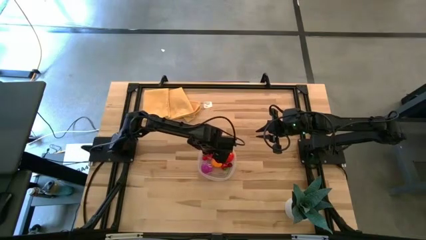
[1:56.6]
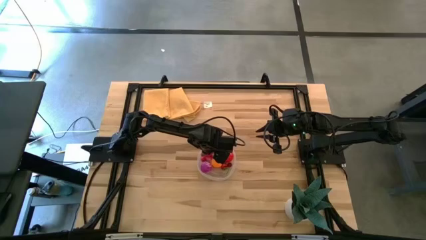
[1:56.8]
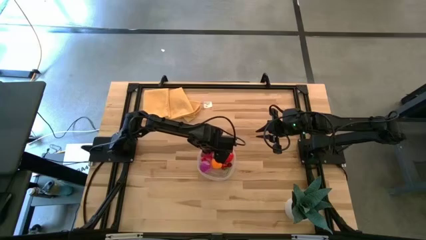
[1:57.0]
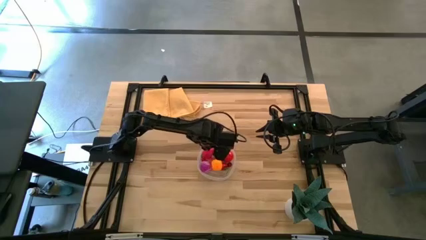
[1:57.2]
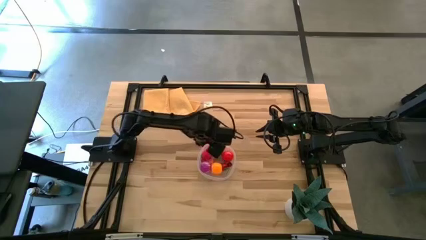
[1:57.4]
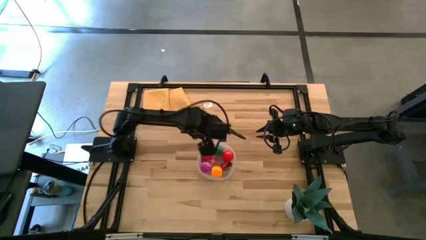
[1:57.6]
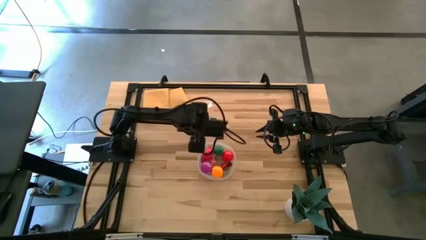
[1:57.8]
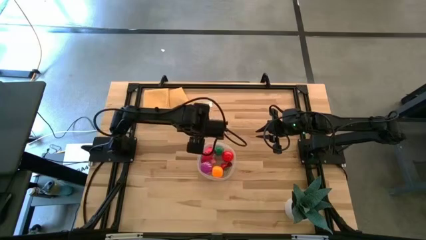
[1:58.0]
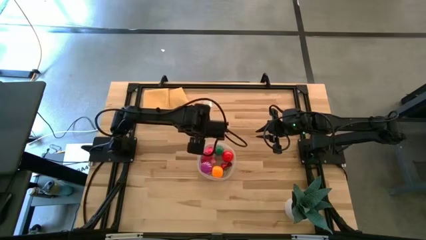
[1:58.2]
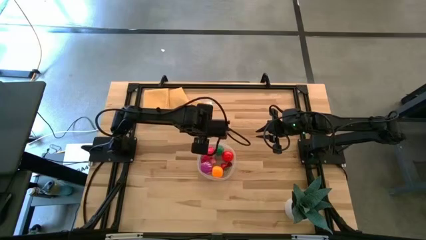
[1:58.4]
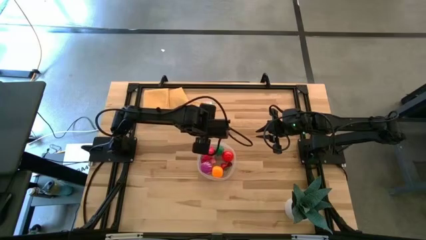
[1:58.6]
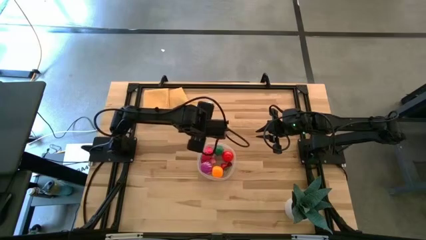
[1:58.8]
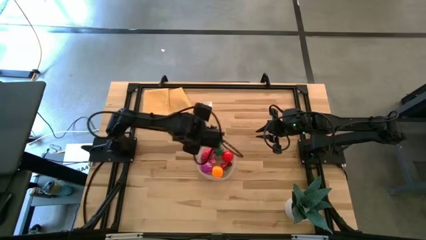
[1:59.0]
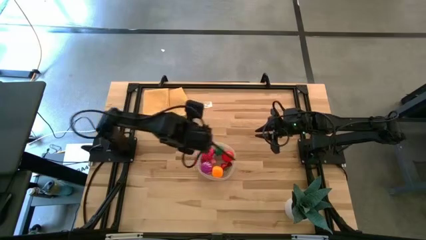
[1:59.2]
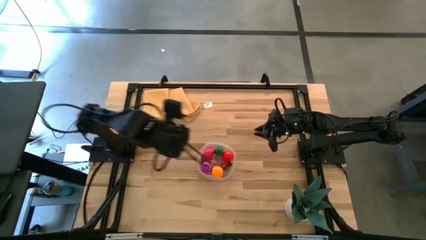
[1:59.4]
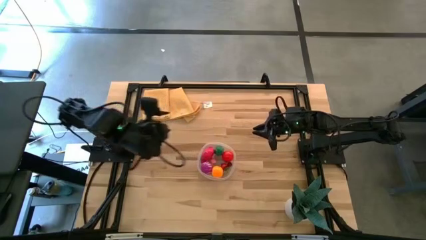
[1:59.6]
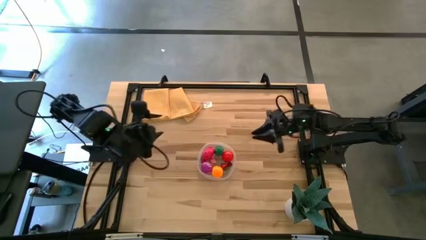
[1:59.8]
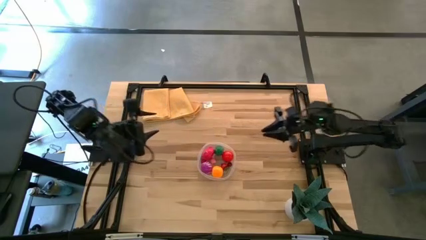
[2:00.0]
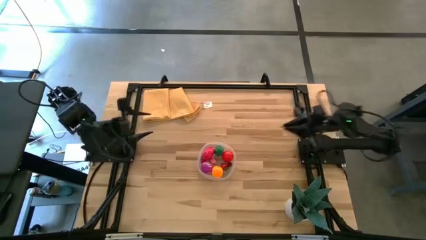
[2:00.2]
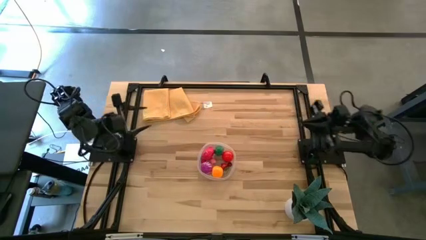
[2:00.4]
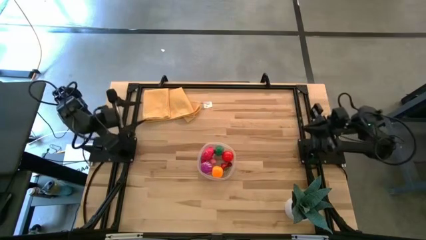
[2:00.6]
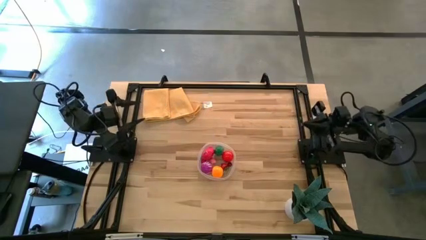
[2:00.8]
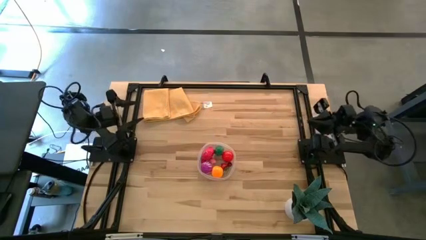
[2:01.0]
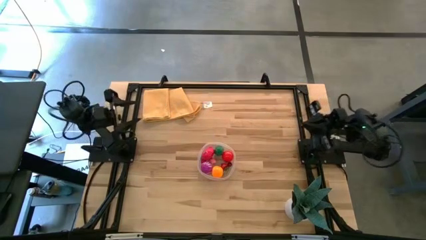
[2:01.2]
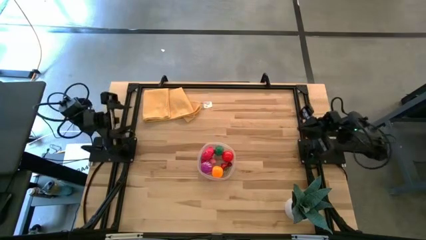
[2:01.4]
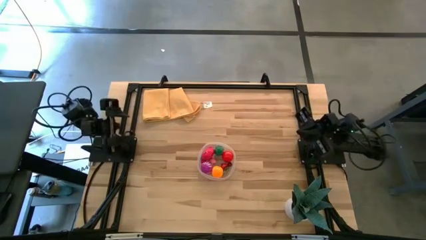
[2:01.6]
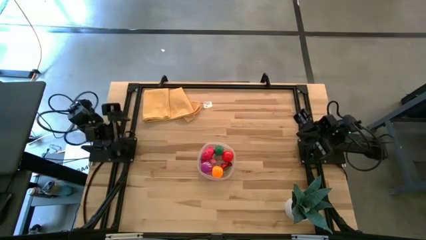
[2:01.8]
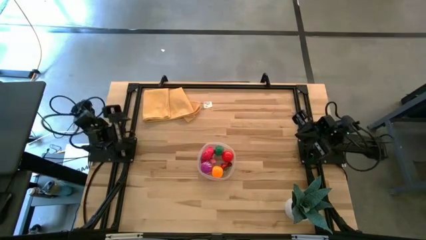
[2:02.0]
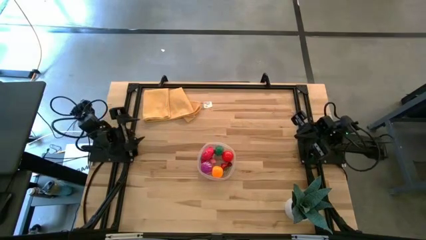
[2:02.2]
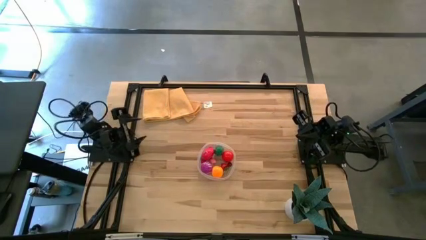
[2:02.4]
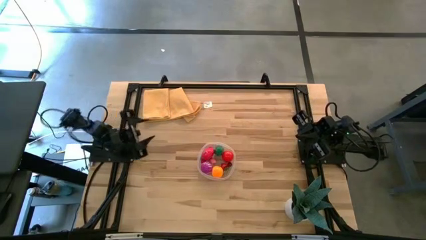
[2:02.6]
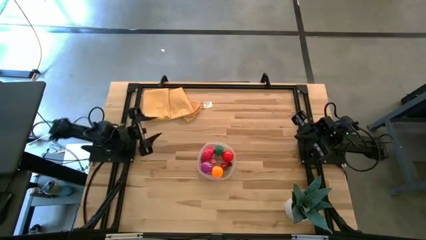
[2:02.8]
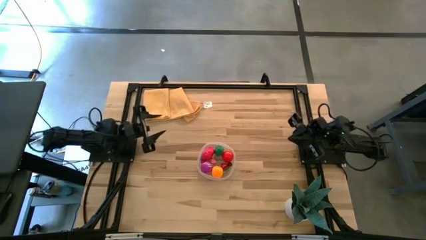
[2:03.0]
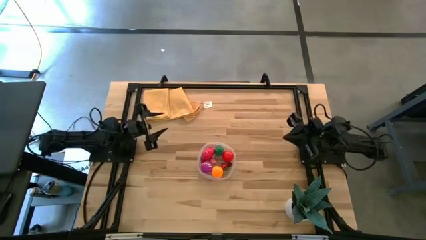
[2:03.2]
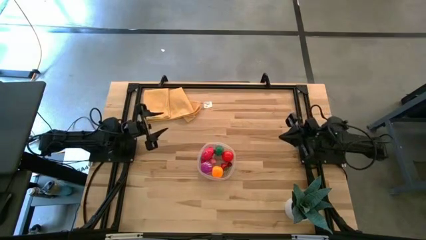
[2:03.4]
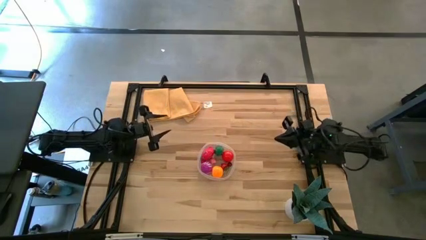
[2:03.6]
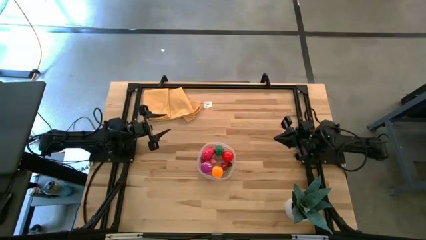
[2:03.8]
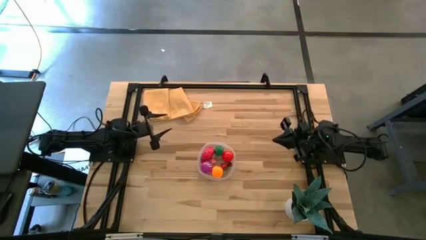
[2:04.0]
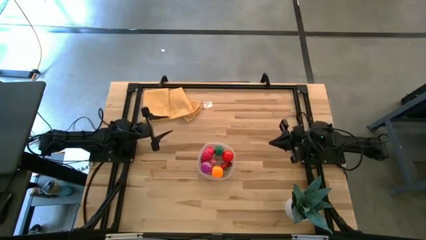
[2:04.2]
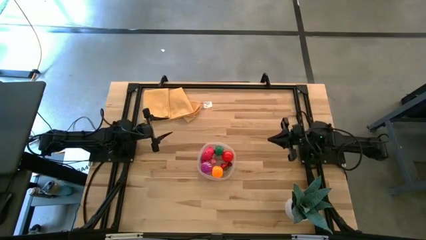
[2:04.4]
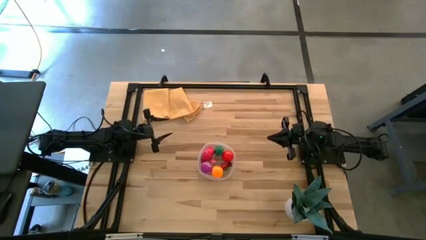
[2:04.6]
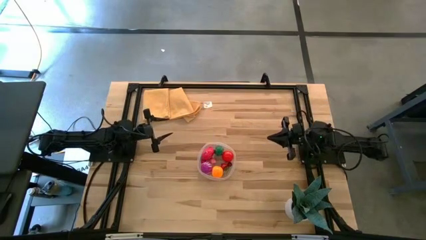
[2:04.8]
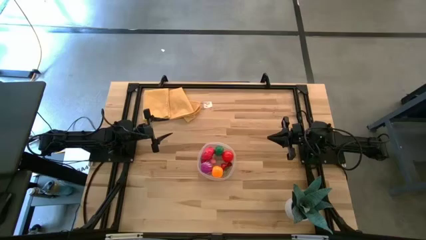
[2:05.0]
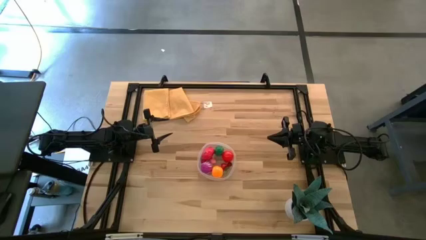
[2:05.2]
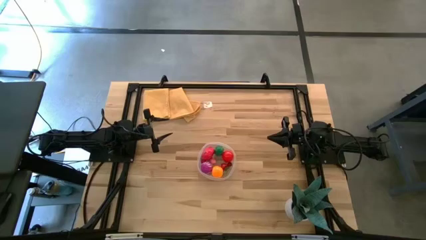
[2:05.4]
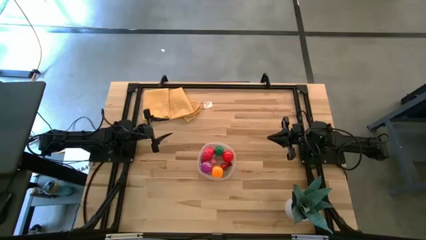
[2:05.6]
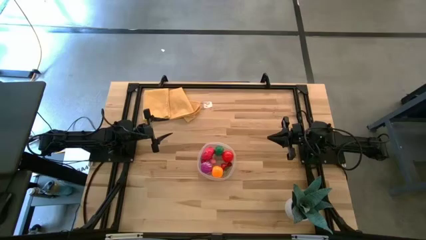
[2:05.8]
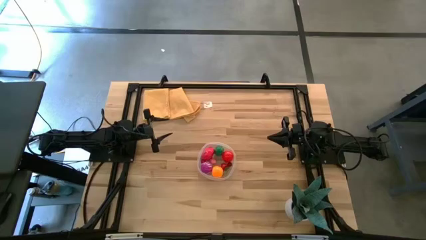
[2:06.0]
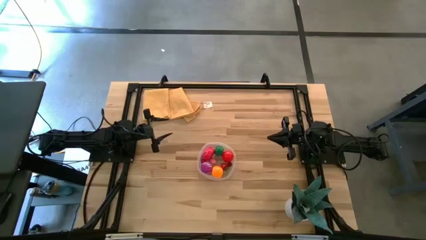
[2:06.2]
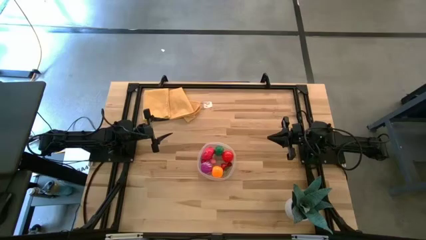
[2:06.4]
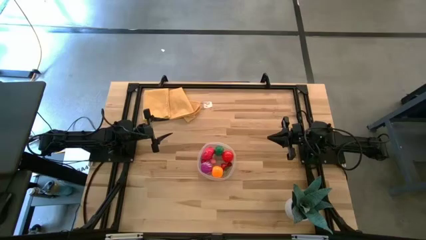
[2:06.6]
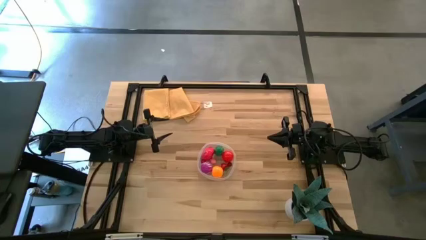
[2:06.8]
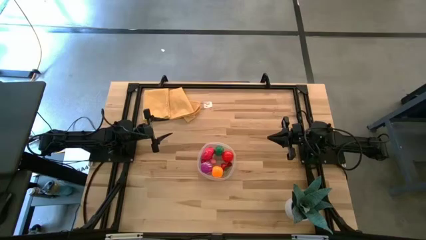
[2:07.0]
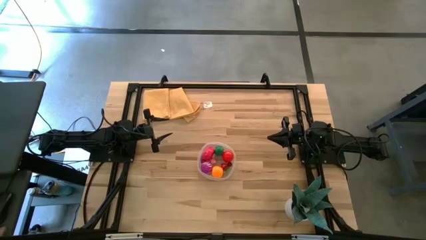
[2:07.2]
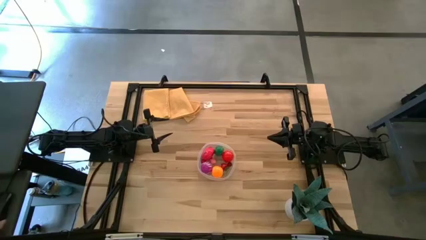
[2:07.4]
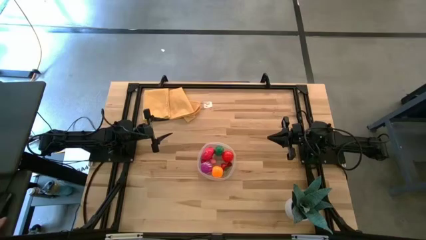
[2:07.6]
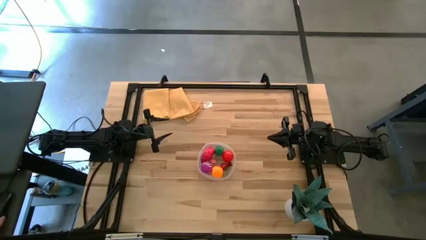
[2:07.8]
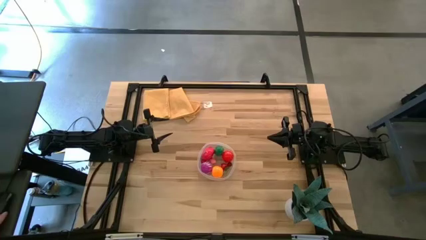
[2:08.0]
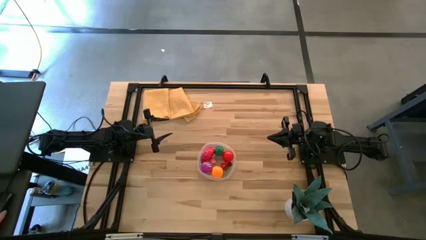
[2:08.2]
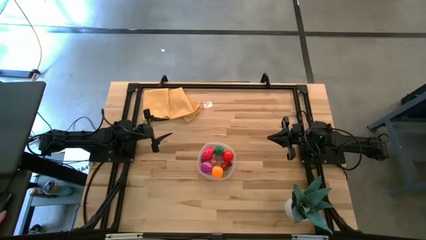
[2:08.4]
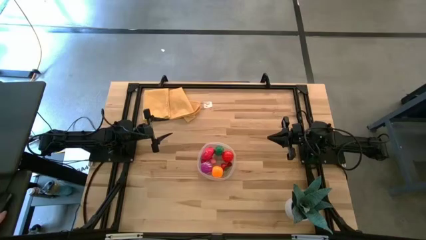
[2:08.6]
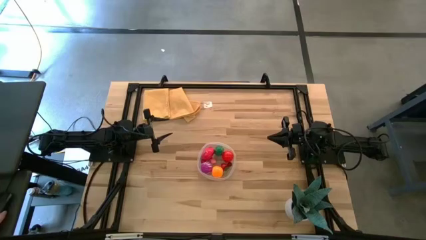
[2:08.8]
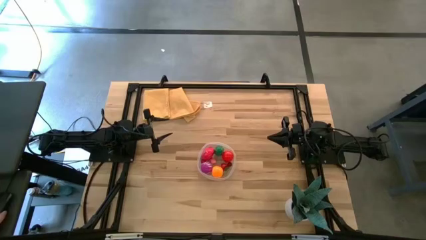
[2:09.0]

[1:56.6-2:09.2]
Task: Pick and placing Produce into tupperware
Return to Home Position

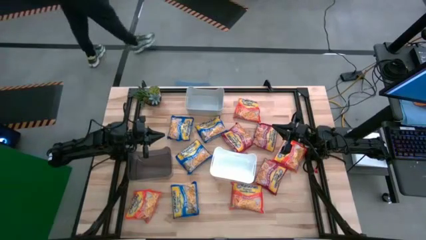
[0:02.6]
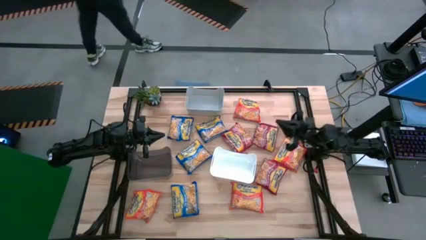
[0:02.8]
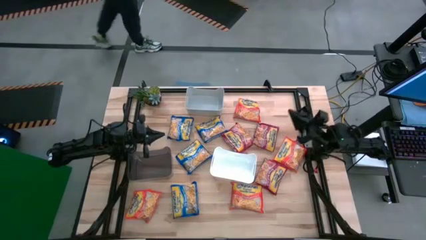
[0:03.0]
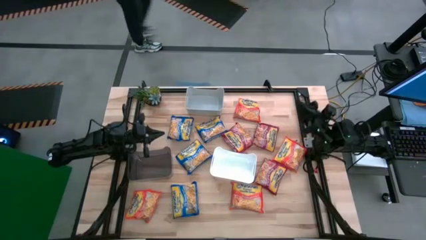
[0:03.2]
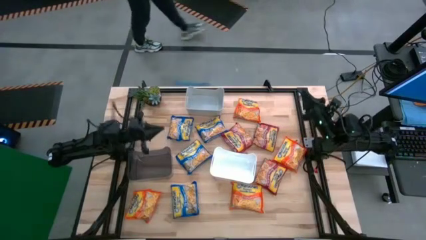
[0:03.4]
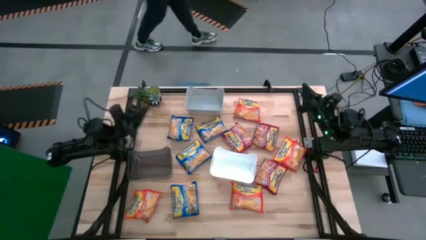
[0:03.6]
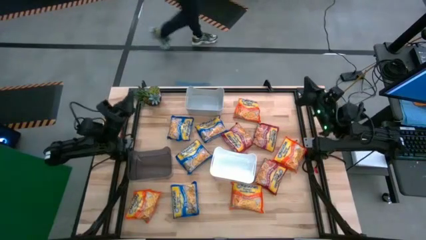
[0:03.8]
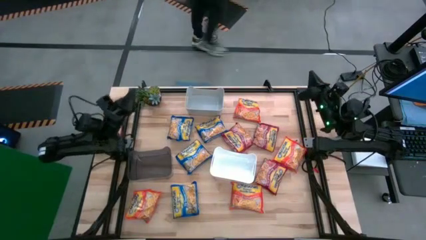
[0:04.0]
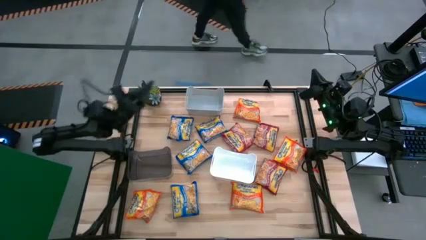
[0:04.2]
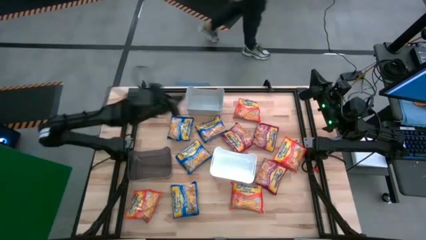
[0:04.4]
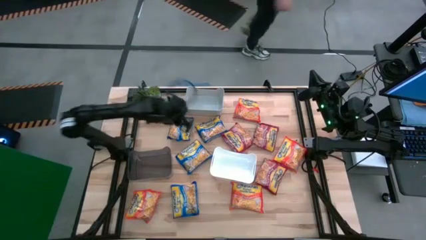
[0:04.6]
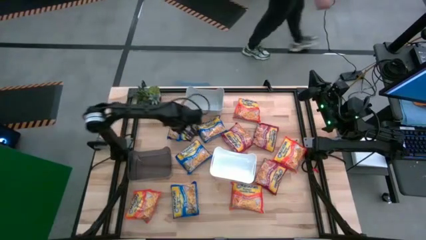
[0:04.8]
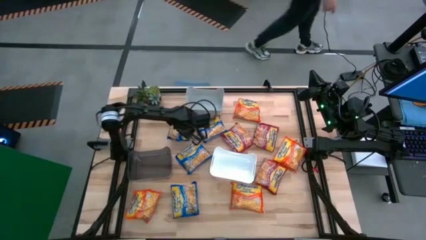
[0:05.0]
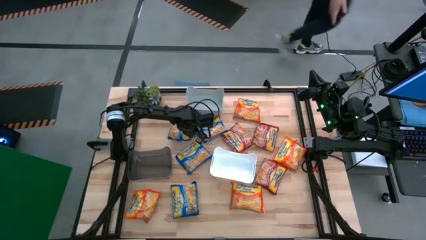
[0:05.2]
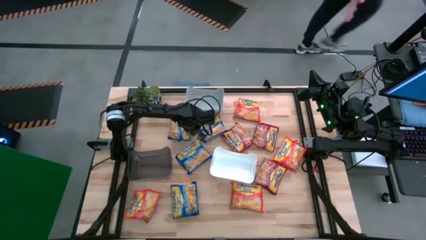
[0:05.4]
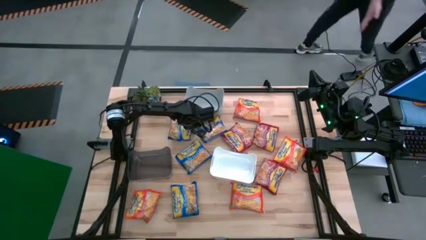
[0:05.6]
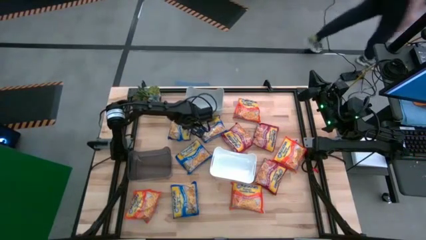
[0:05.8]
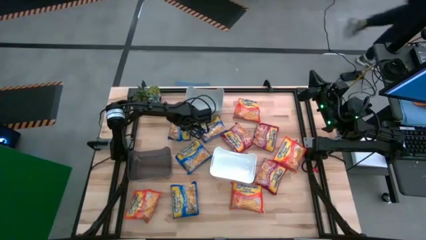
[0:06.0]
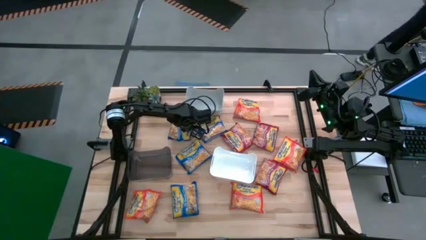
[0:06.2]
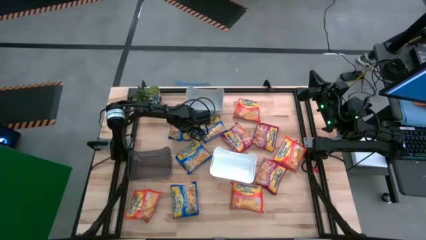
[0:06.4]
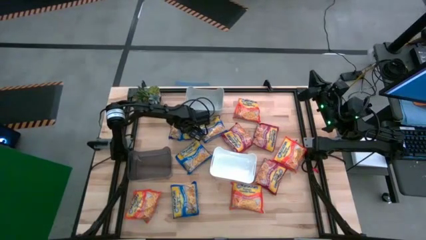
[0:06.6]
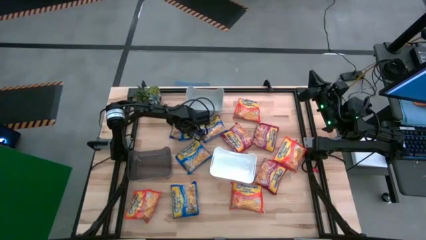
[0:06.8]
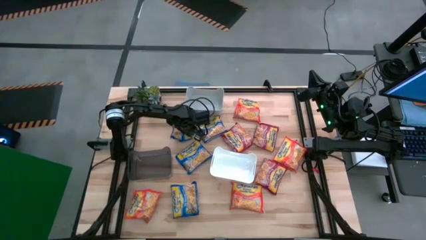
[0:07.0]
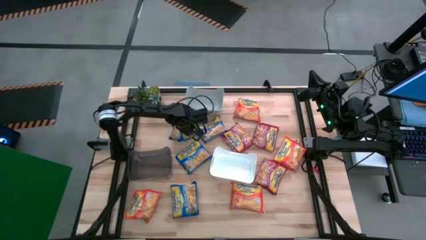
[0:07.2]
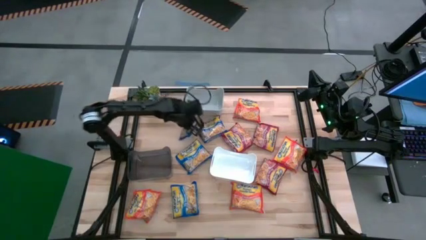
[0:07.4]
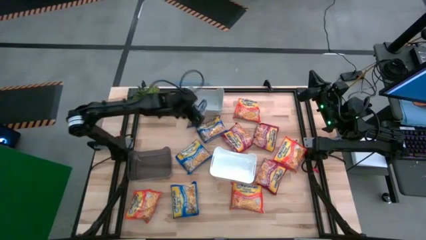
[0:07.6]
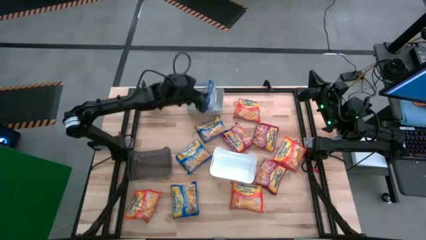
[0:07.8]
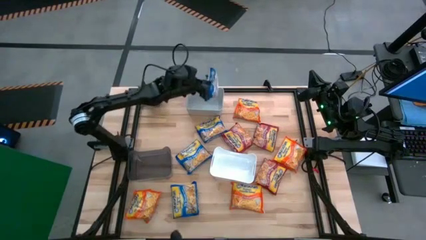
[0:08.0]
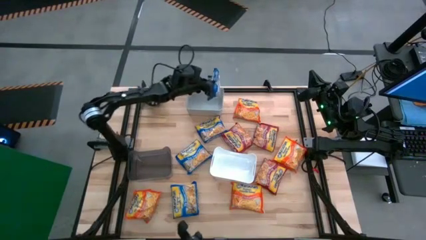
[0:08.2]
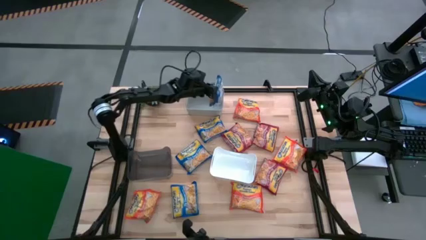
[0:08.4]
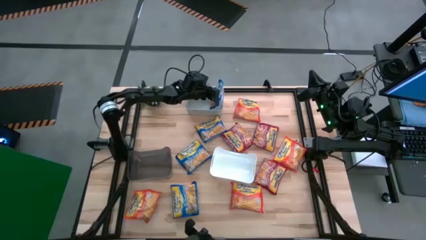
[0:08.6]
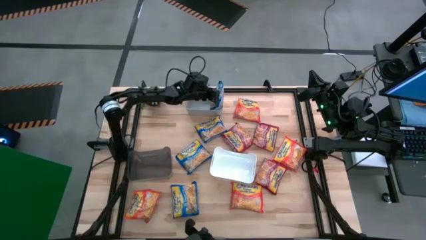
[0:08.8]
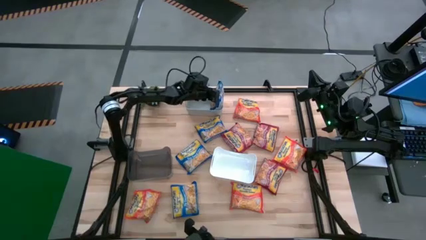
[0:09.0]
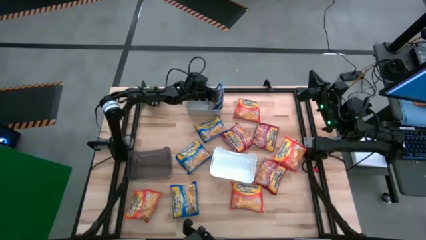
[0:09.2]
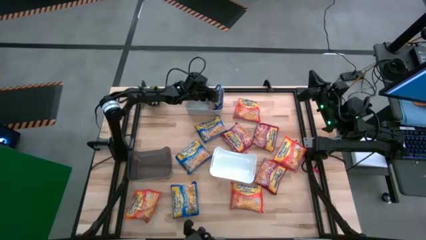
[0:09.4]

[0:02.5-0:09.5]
Task: Sort Maruchan noodles
Put the blue noodle pack into the gray bin
